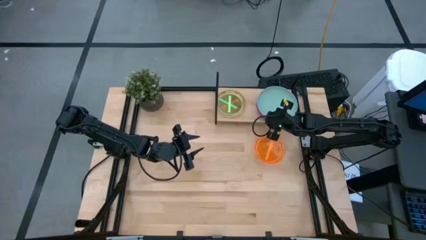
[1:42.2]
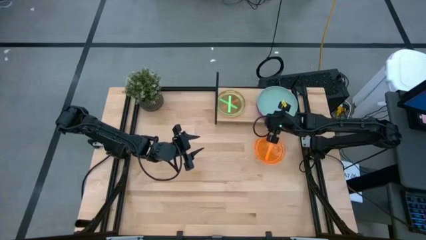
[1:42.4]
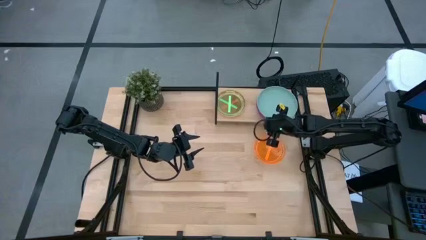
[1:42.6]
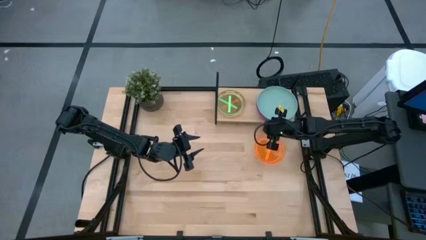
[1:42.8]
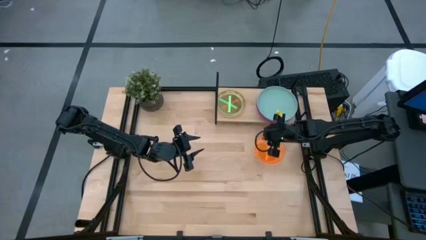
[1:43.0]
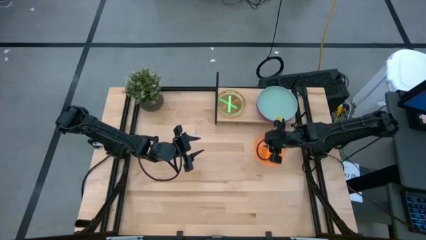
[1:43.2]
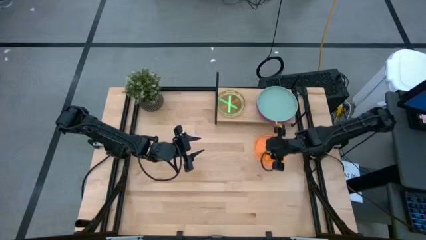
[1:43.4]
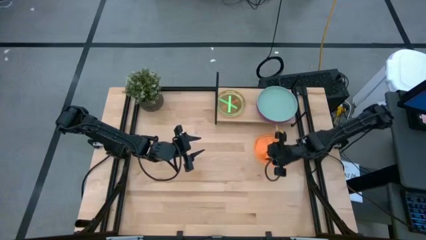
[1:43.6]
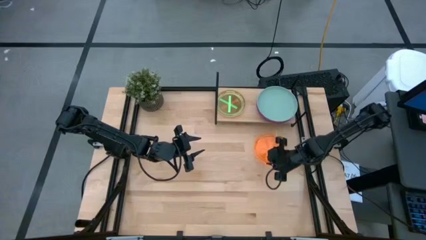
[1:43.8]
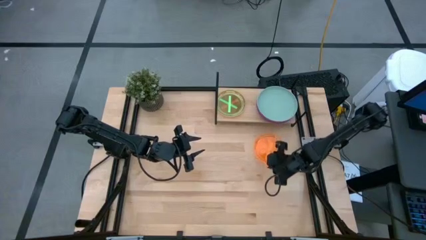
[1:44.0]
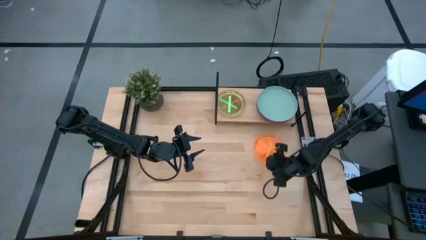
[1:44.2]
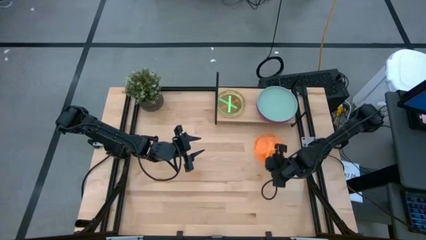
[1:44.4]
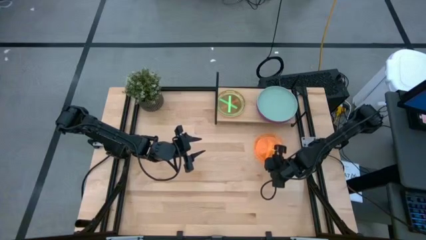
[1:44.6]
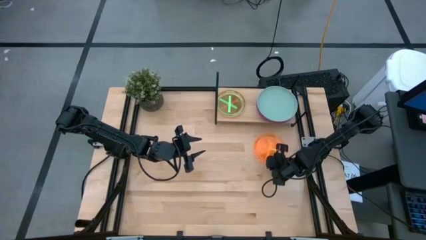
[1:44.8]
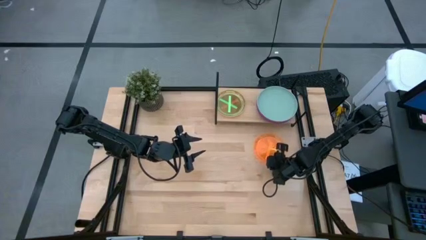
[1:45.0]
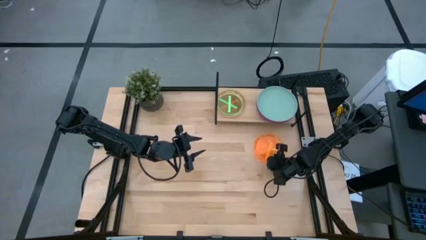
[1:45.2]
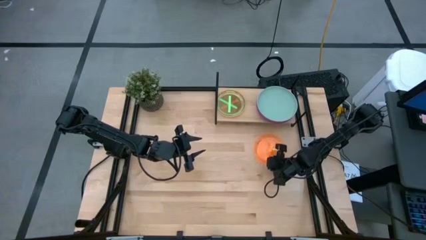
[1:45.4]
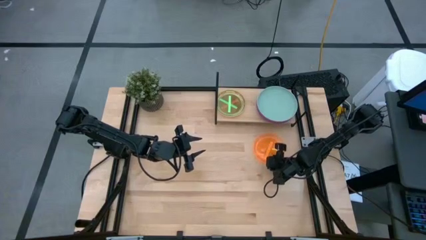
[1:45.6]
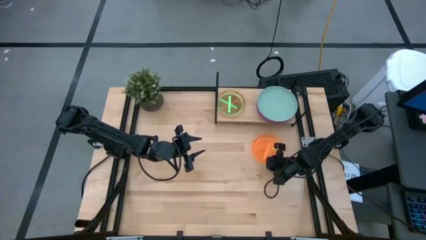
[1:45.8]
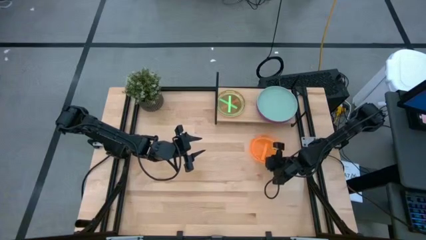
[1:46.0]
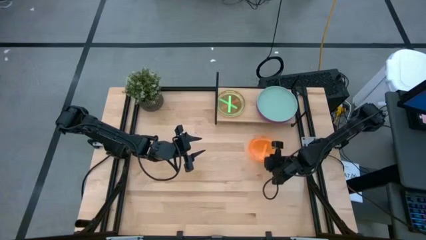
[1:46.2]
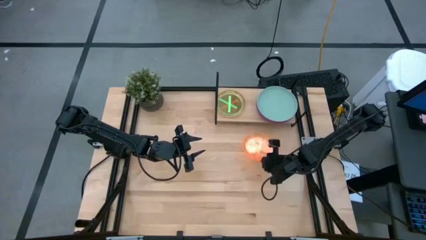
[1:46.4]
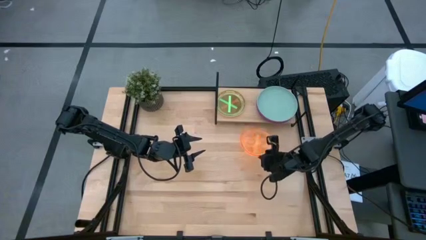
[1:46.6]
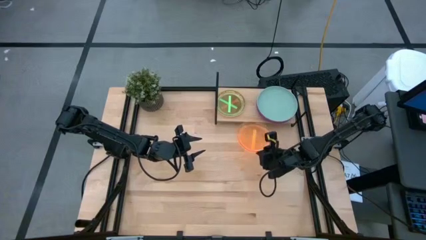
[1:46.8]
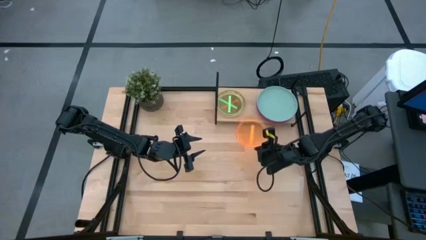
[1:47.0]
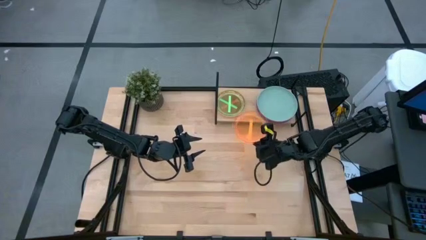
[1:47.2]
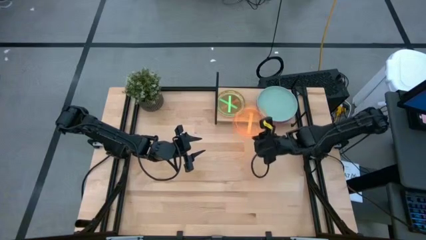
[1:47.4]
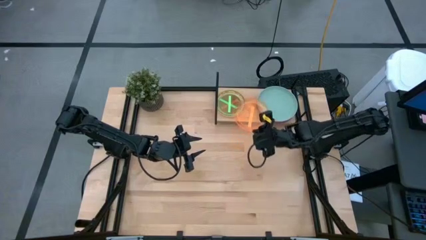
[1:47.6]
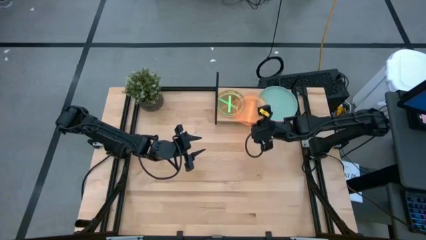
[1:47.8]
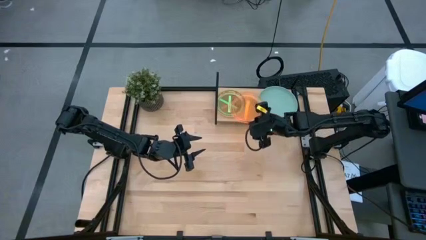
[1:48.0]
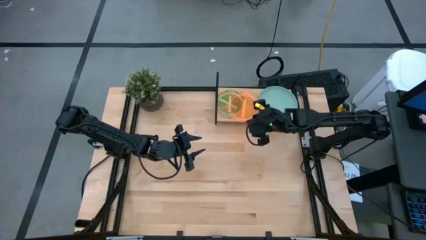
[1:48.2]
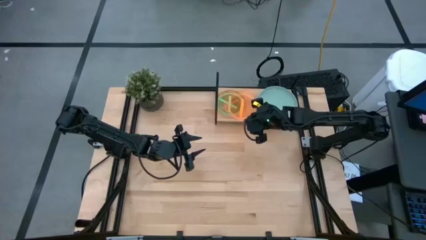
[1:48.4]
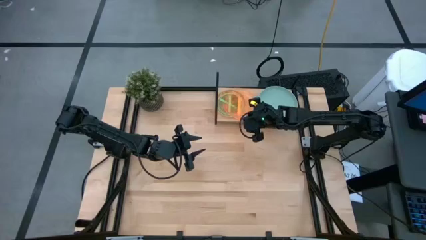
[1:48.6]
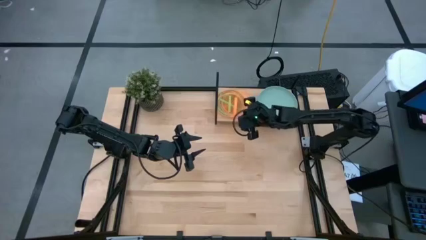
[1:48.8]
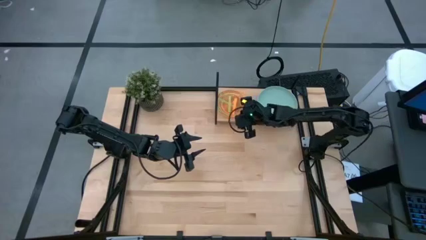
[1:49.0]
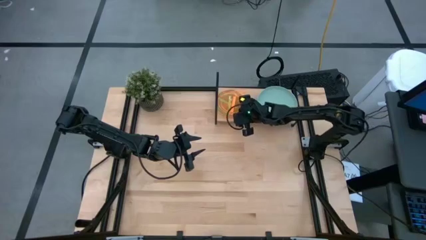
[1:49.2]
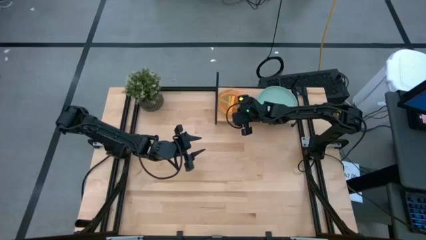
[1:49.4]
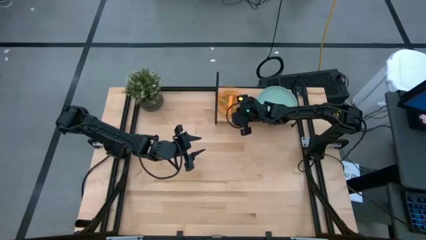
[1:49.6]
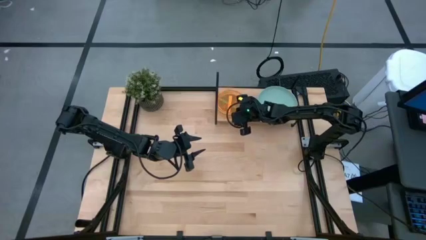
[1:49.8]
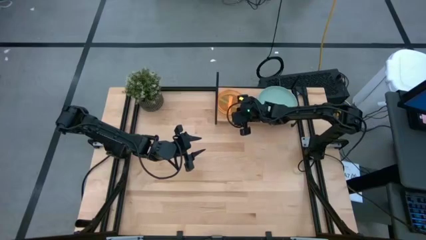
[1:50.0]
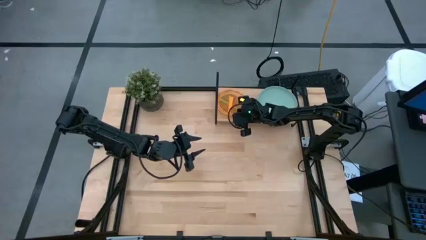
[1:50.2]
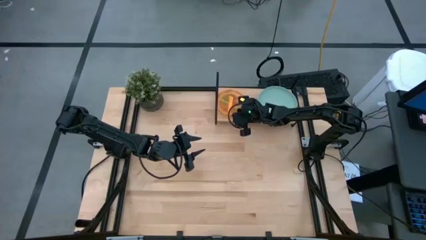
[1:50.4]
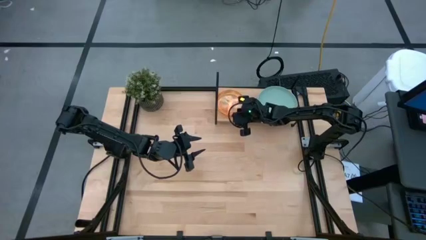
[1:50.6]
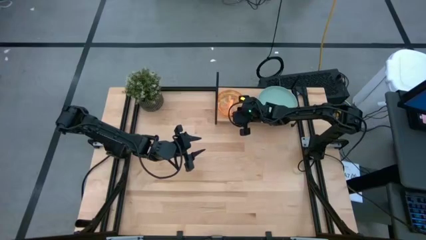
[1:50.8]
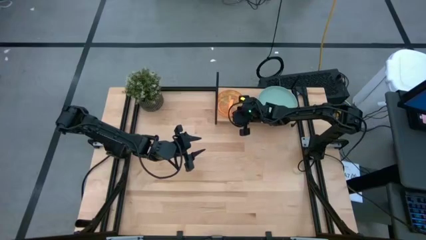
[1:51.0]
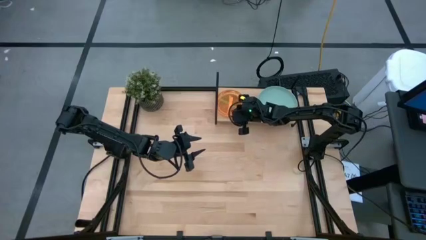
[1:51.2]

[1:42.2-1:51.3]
Task: Place and stack plates onto a shelf
Stack the small orange plate on top of the small green plate

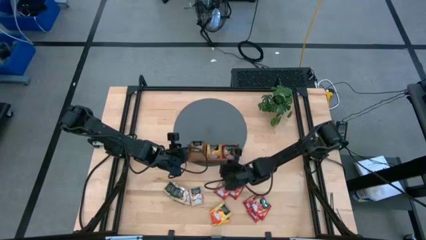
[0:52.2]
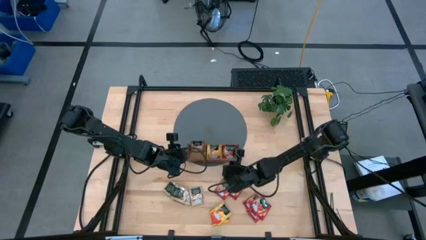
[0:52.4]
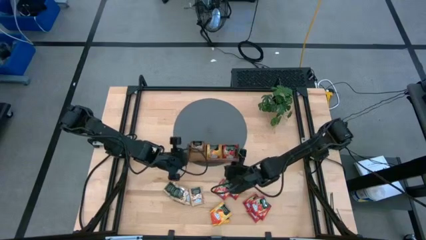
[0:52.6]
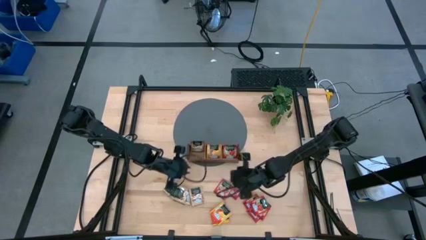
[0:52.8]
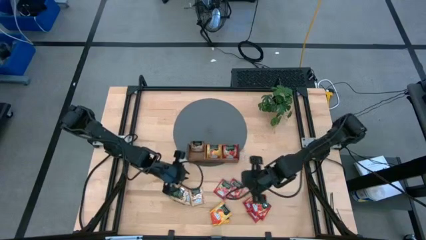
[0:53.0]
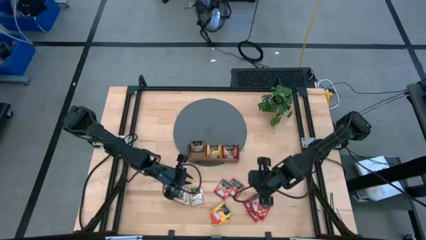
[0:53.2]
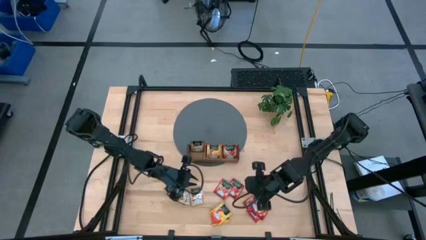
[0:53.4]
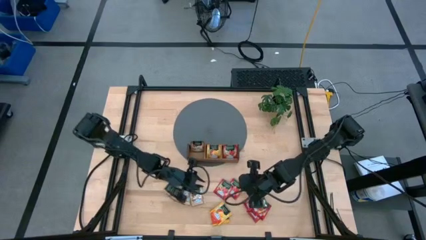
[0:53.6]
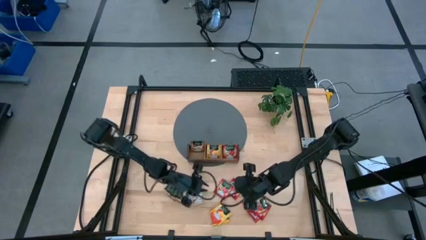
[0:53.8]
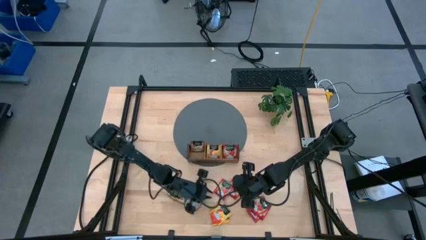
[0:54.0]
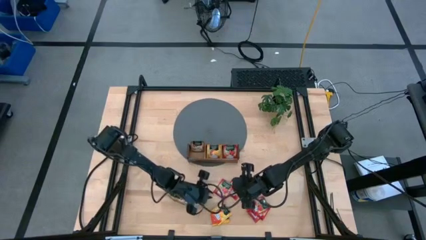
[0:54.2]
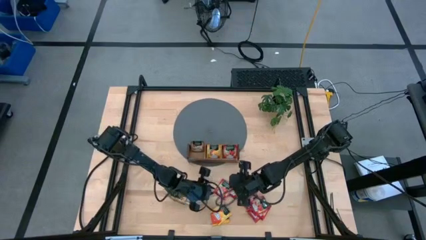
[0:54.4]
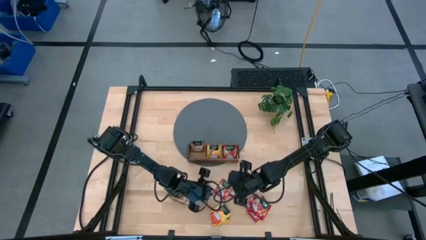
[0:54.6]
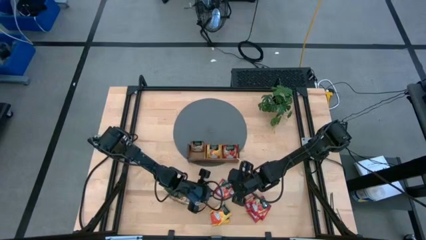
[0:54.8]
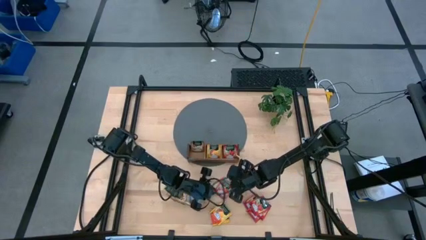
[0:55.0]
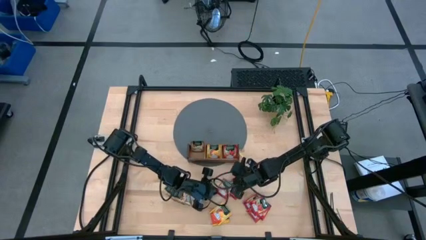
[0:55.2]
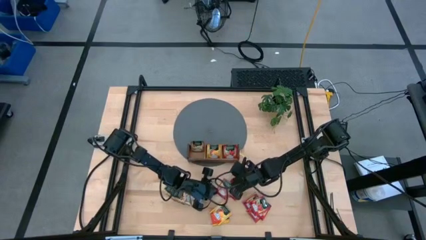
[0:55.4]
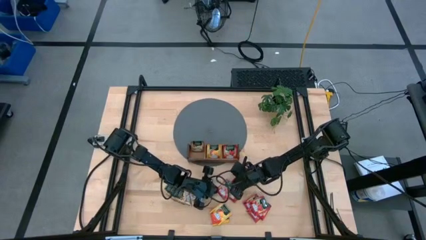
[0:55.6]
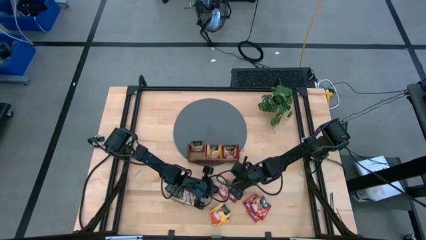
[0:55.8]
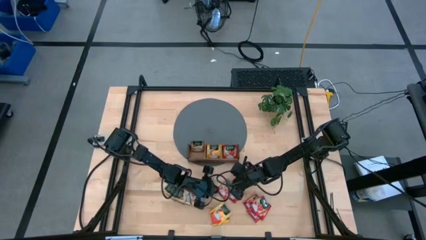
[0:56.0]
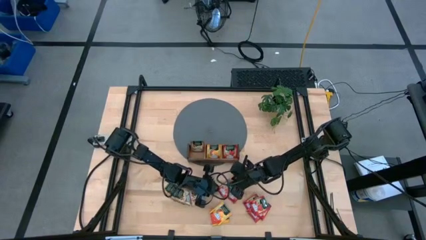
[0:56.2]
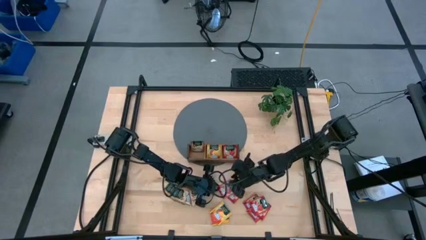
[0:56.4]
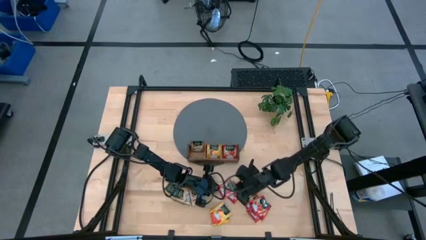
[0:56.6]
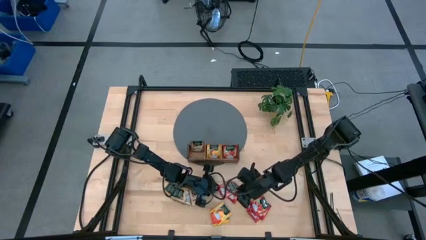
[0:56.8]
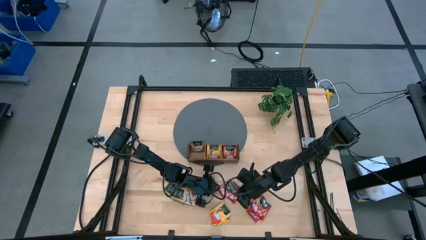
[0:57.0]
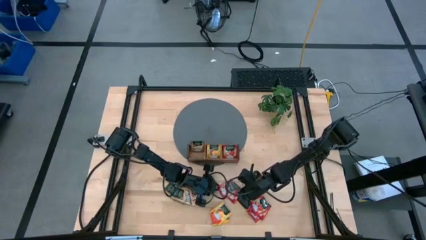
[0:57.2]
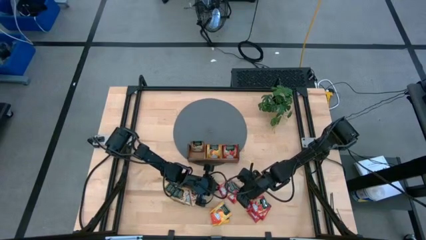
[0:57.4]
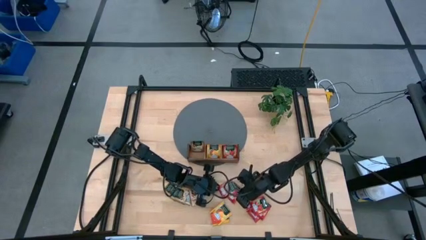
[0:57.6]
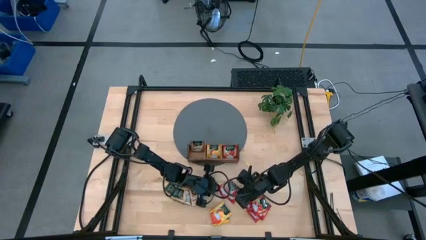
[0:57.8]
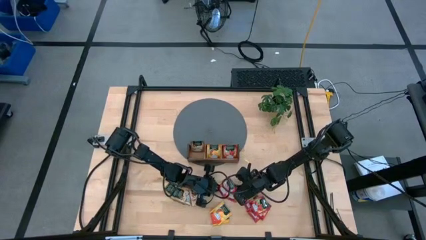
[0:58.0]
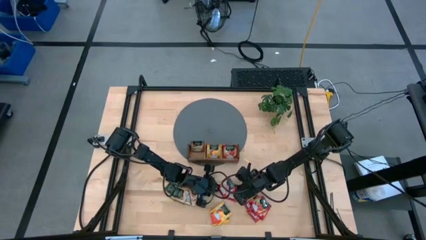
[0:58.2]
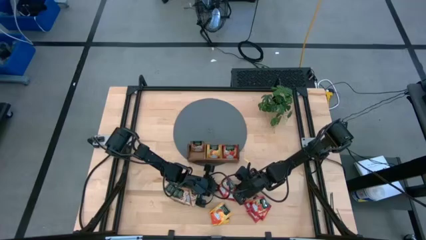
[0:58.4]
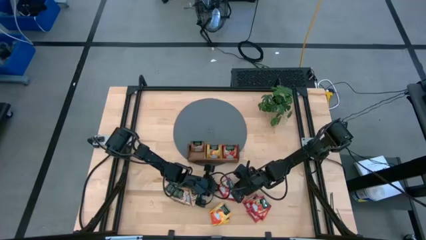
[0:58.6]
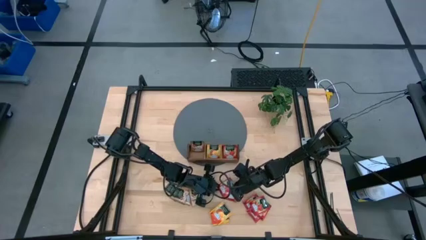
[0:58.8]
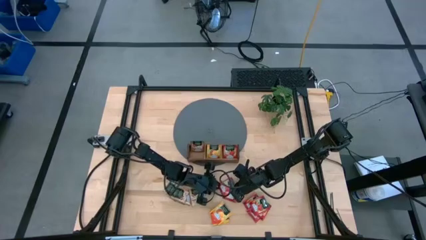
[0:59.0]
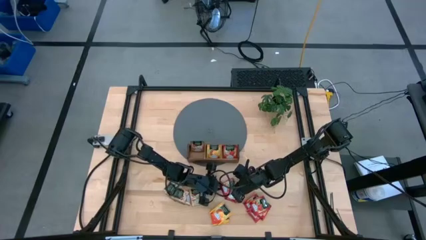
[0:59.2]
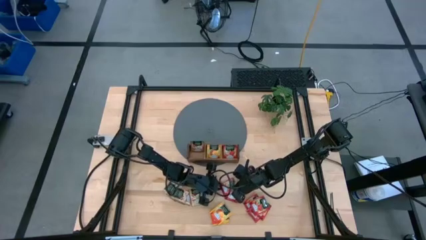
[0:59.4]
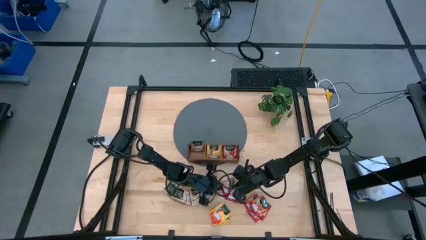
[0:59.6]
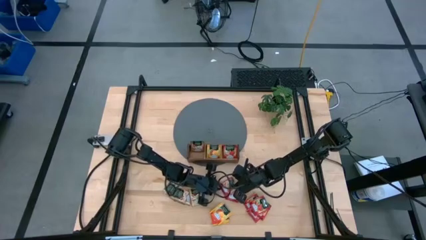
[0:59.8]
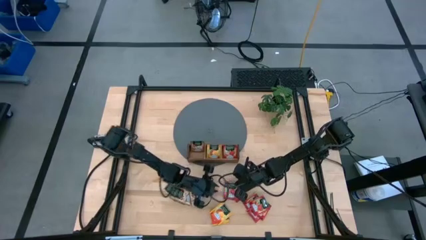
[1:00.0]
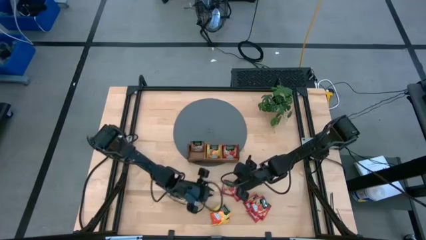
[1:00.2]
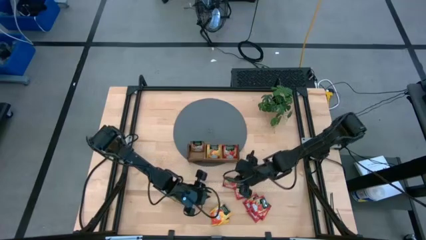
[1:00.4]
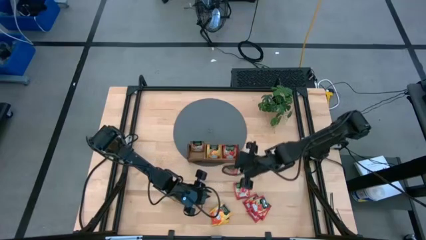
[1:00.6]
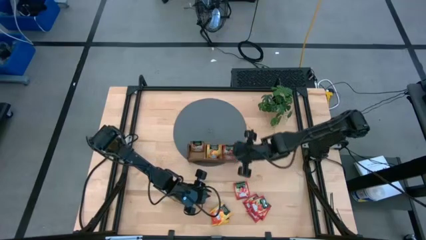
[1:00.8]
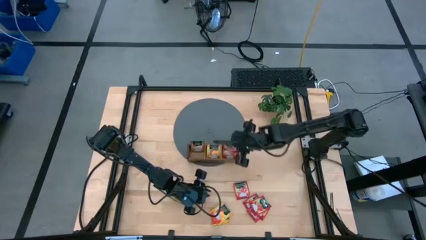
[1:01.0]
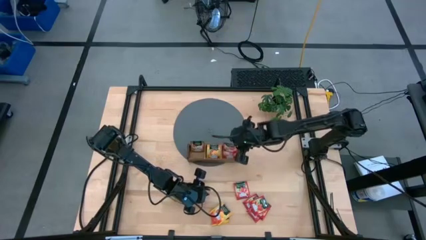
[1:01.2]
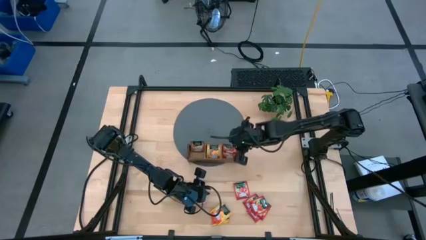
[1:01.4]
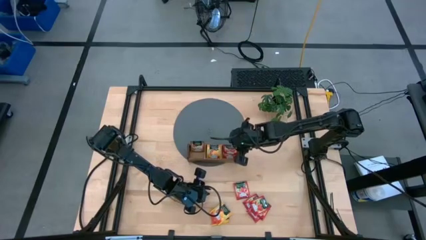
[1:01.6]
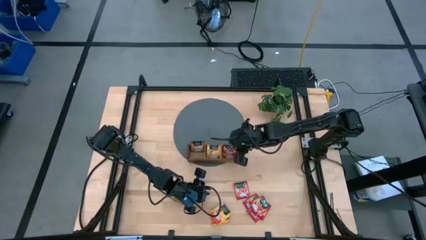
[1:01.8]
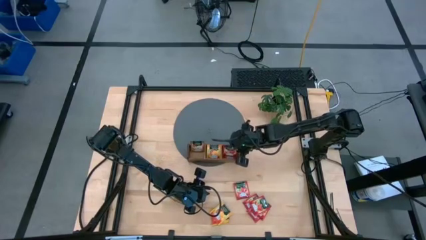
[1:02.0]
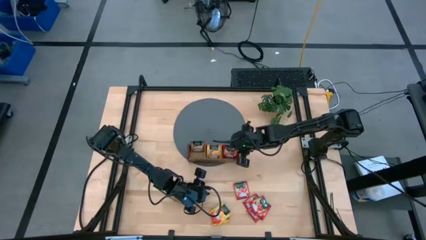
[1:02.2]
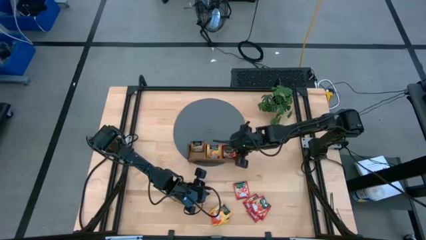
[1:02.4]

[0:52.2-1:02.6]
Task: Pick & Place Tea
Put the red tea bag into the right section of the wooden organizer
